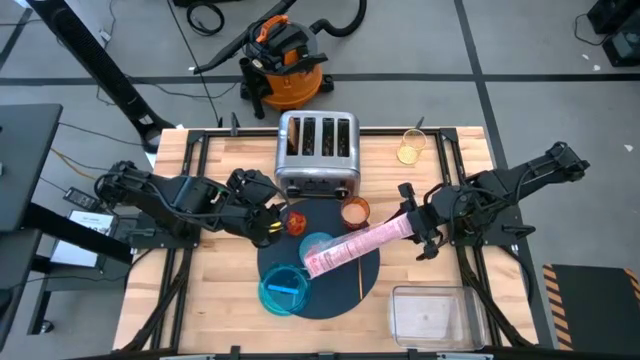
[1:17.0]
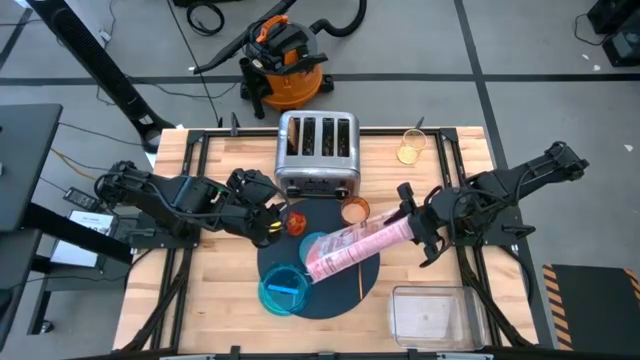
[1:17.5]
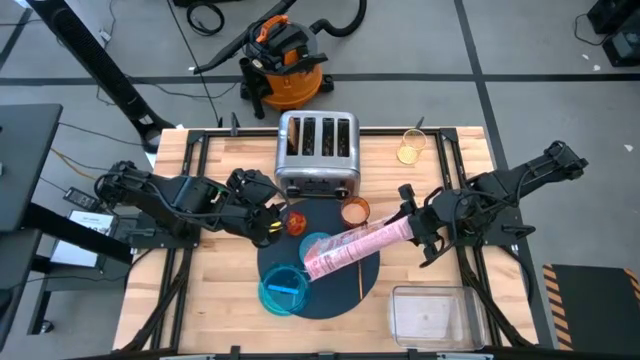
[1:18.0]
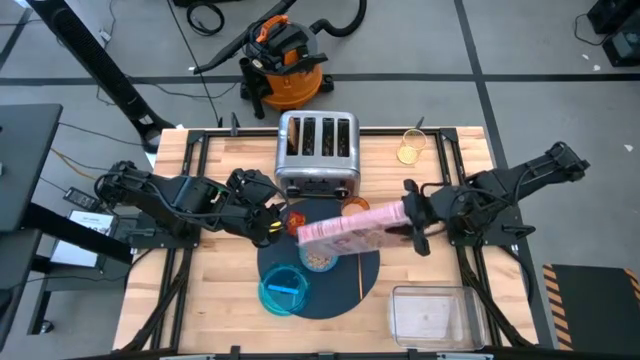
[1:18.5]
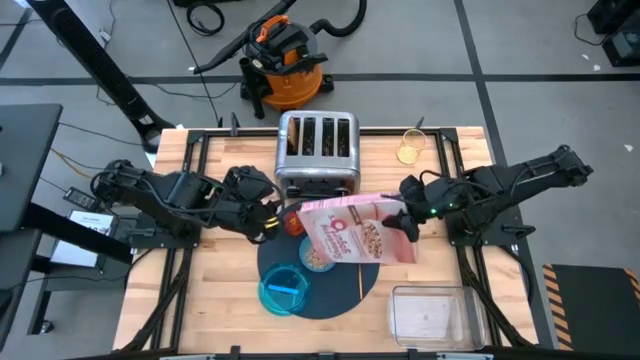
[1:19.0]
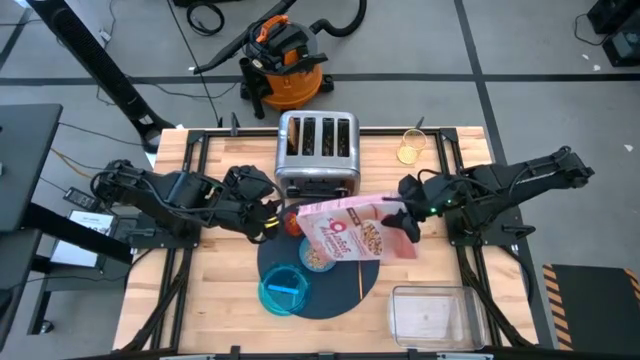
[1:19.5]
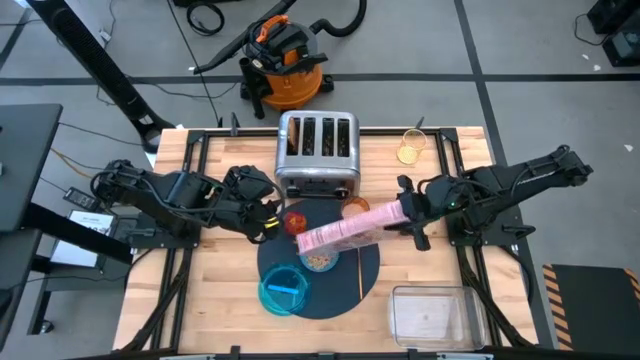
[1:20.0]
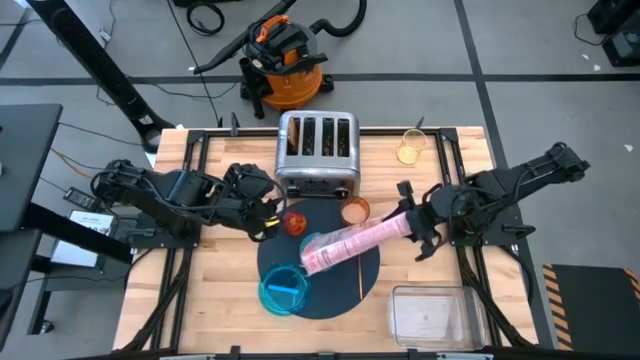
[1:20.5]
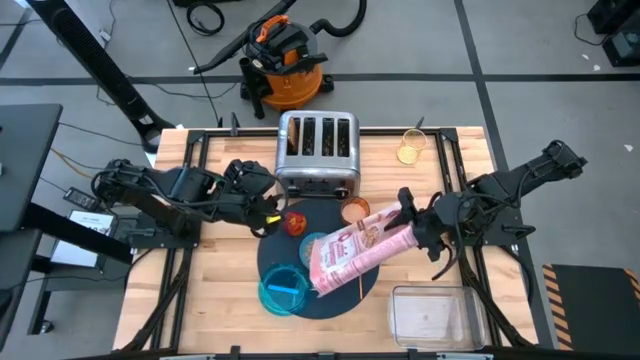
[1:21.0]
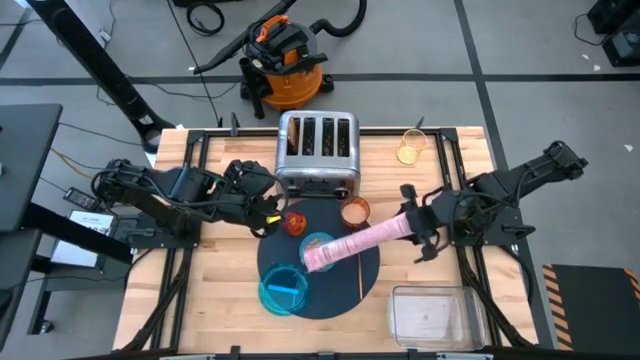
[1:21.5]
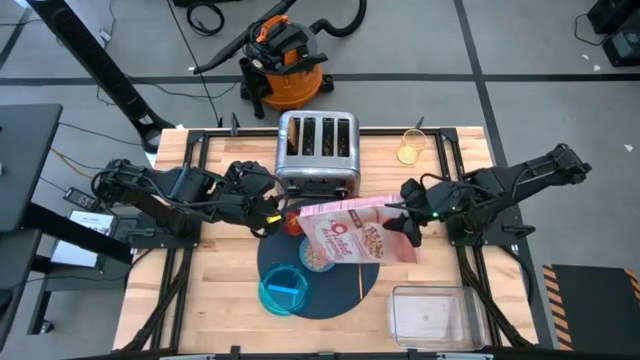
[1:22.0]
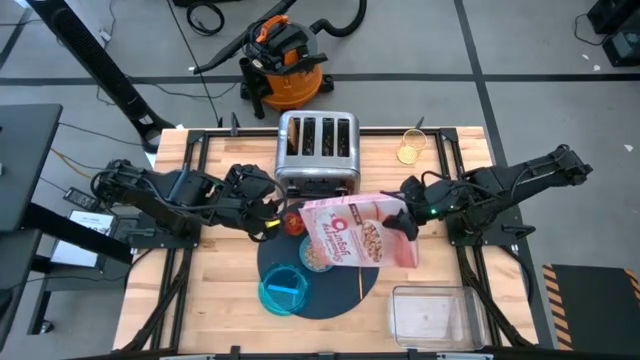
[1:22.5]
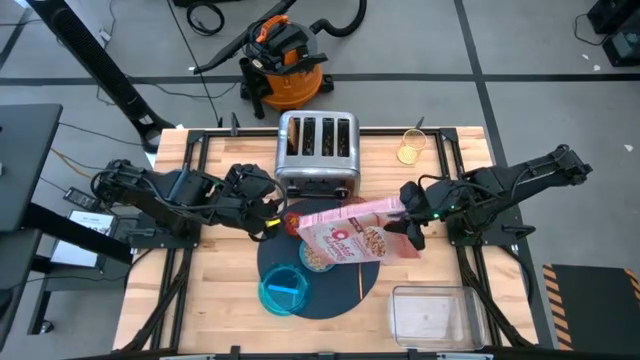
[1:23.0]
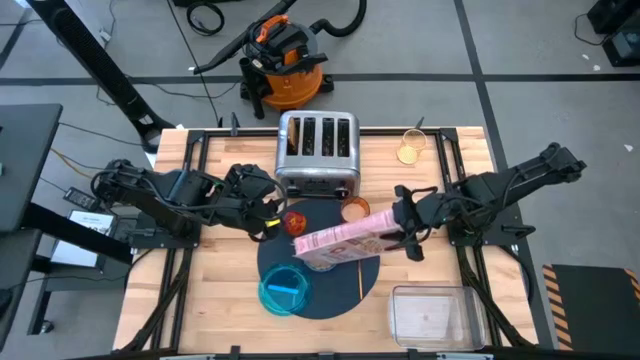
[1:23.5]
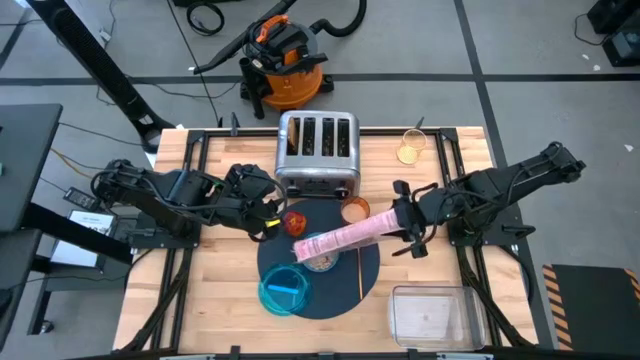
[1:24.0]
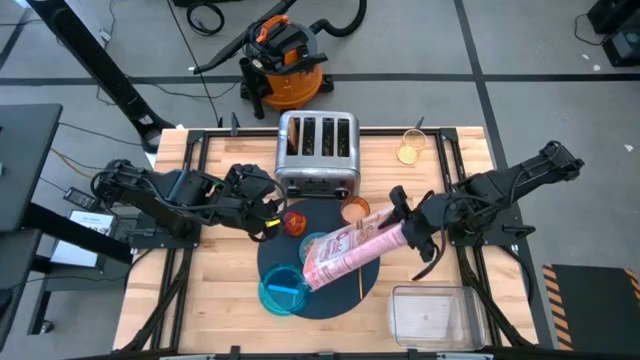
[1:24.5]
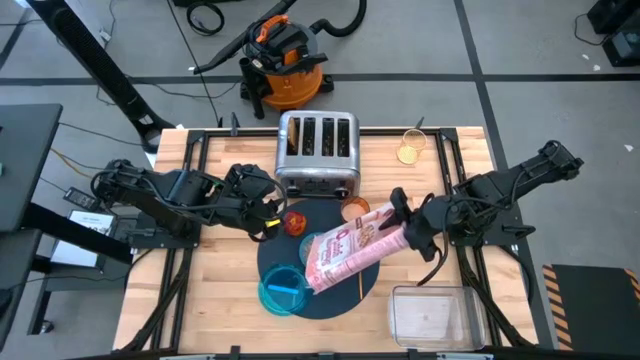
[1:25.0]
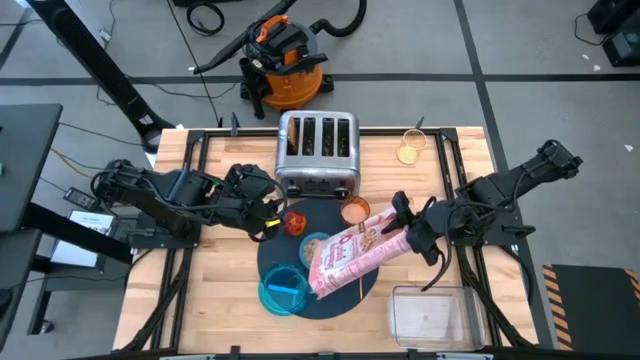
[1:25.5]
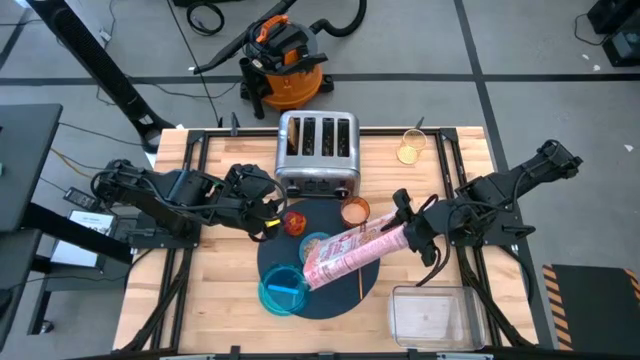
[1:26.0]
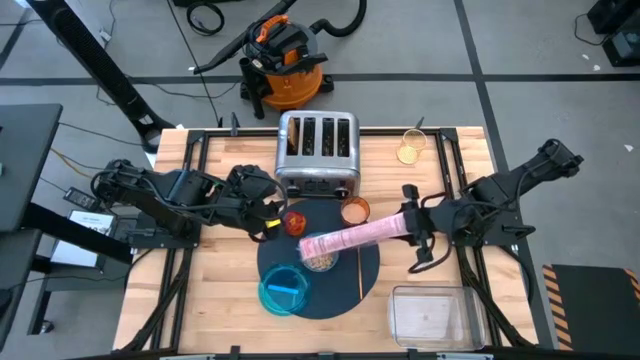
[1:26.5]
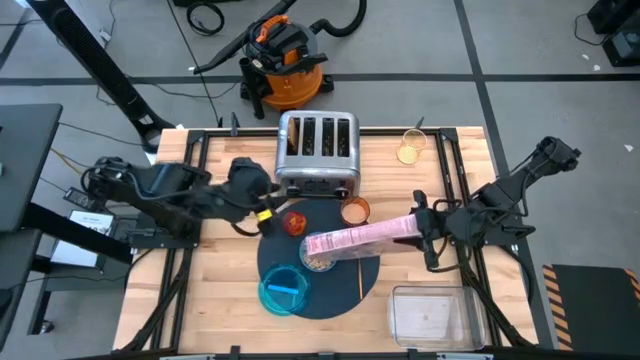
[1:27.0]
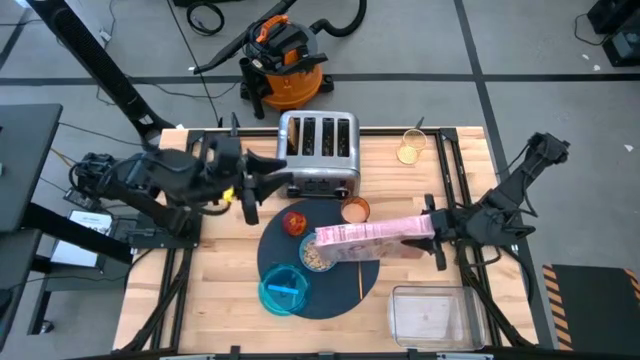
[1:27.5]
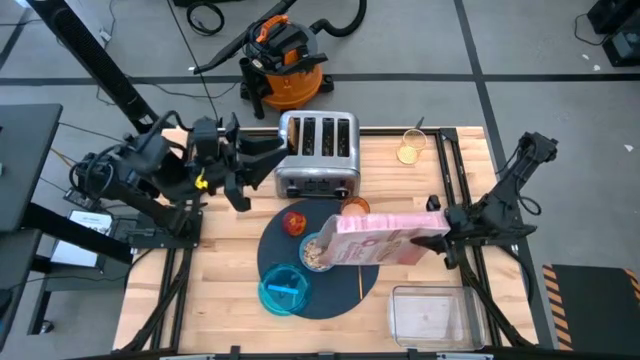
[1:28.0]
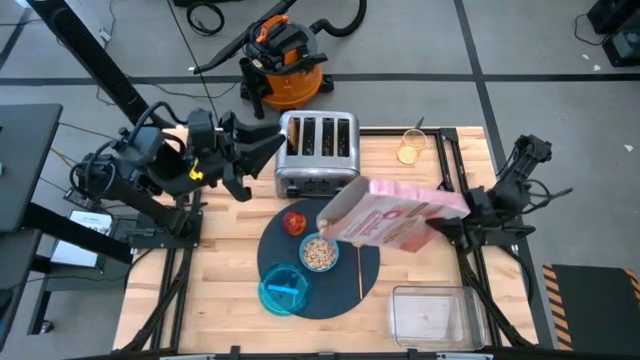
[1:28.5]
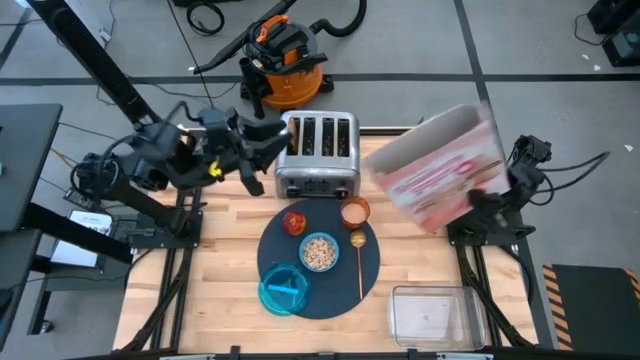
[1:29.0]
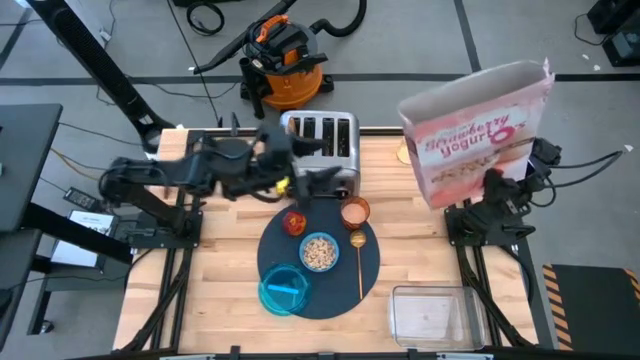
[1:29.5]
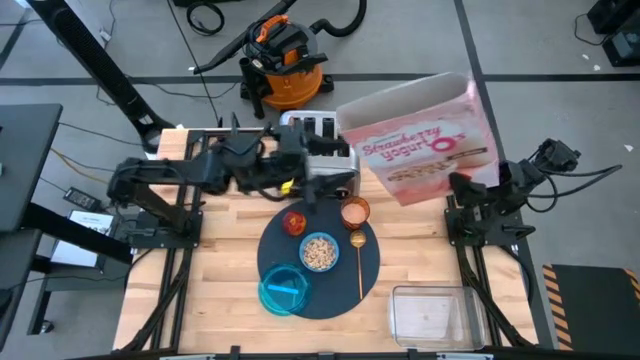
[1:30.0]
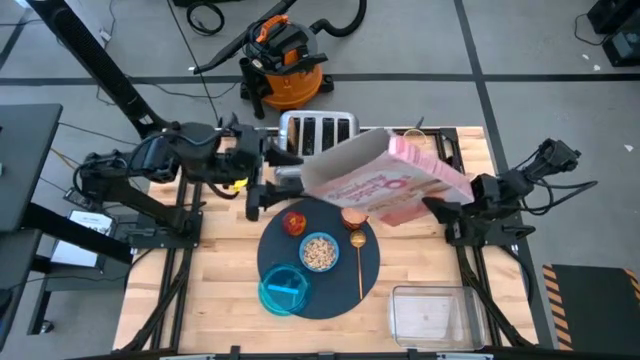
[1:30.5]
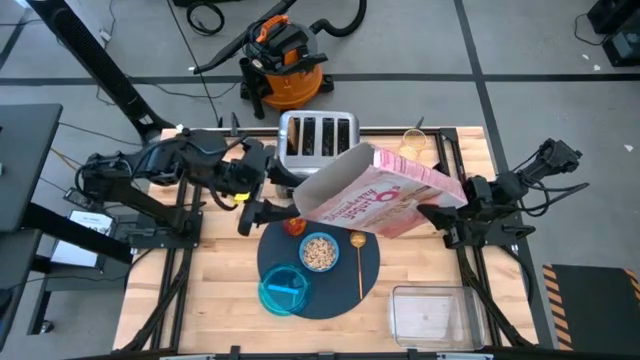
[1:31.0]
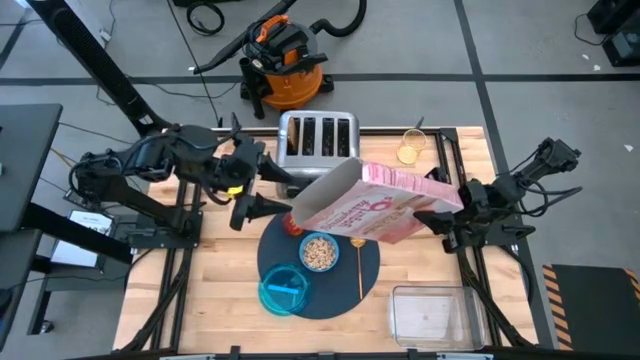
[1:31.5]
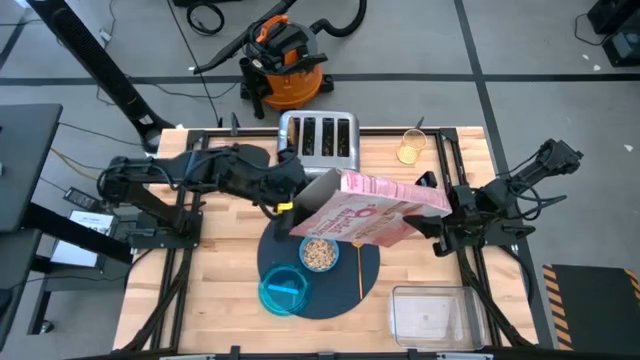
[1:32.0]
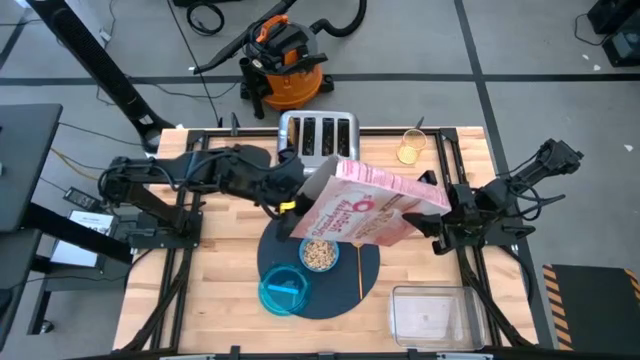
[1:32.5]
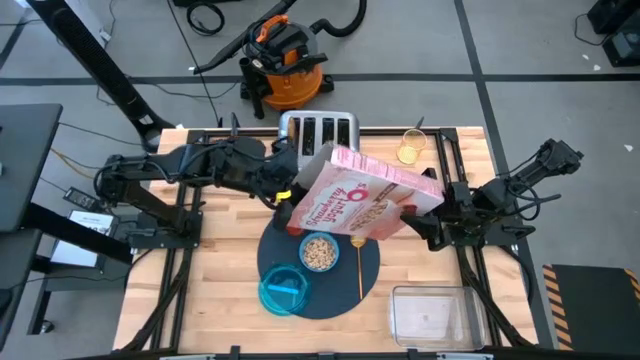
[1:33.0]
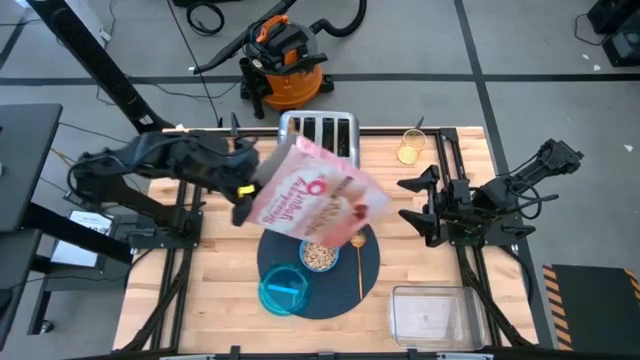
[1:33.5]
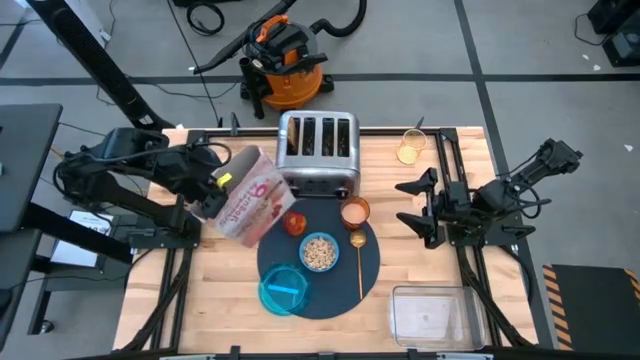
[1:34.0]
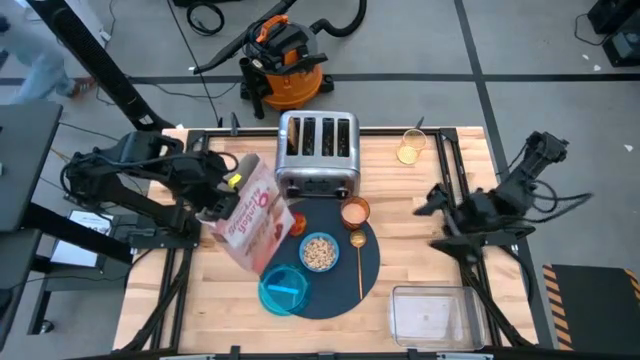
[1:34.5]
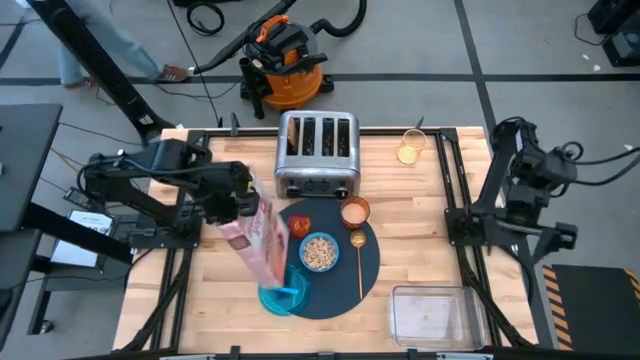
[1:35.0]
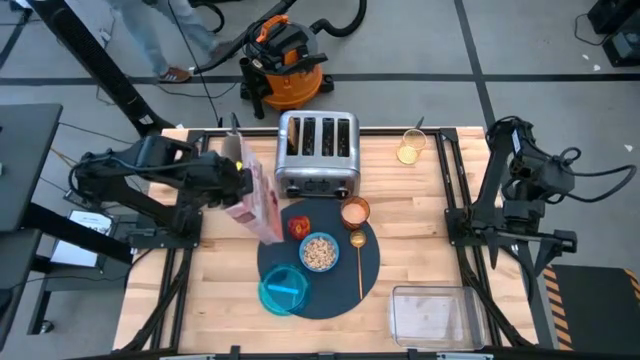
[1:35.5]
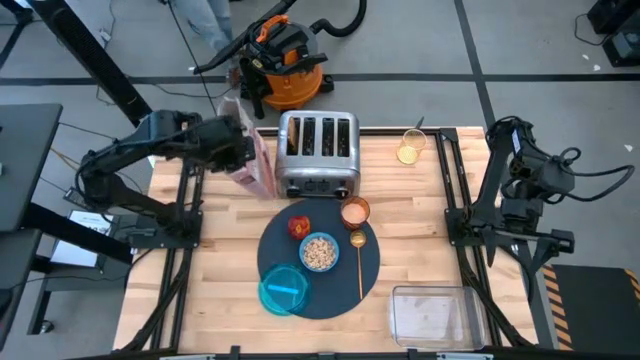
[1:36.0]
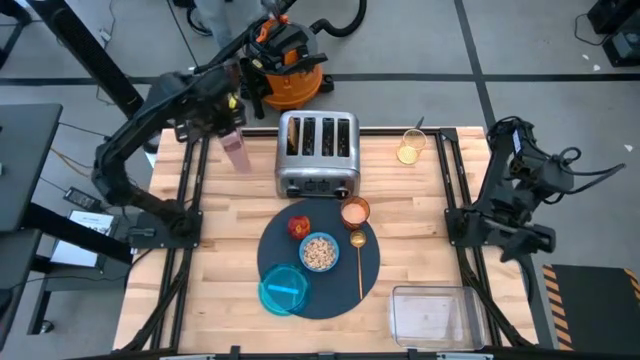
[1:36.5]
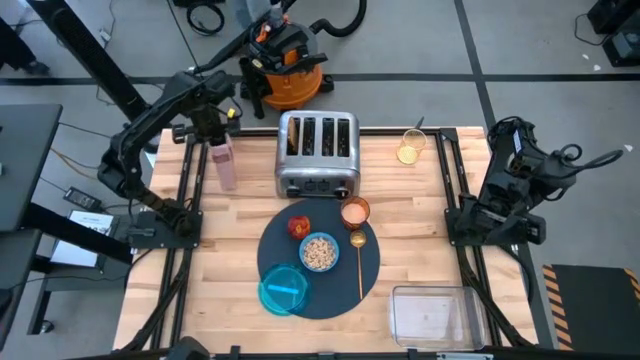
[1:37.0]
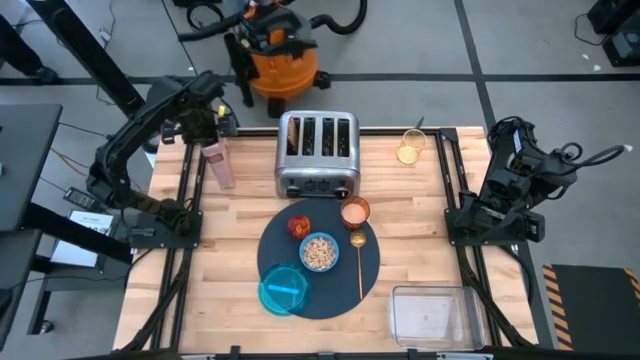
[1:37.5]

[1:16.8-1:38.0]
Task: Arrange a breakfast setting
Pour the pink cereal box into the blue bowl
